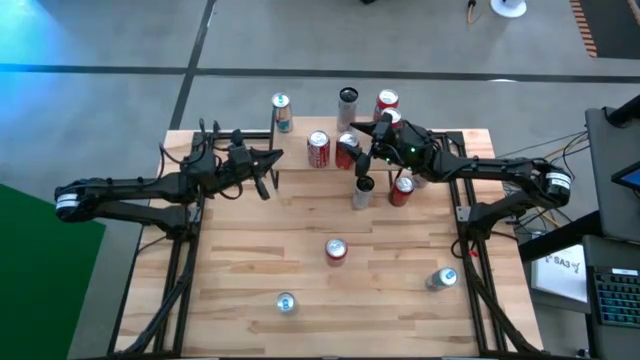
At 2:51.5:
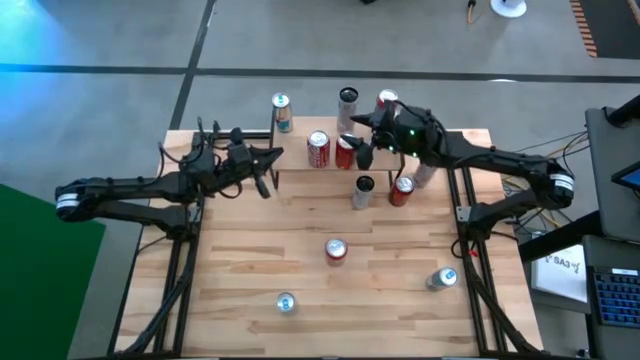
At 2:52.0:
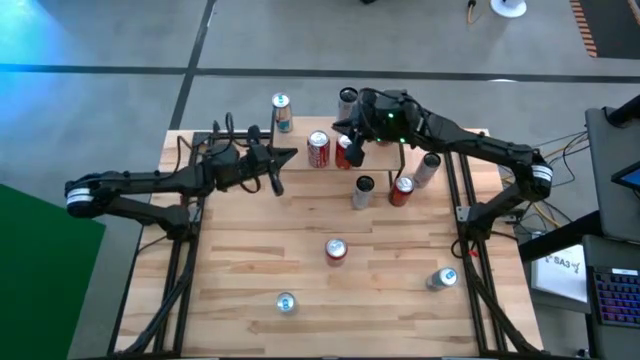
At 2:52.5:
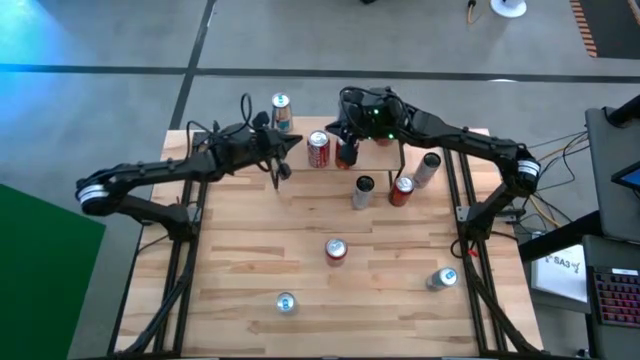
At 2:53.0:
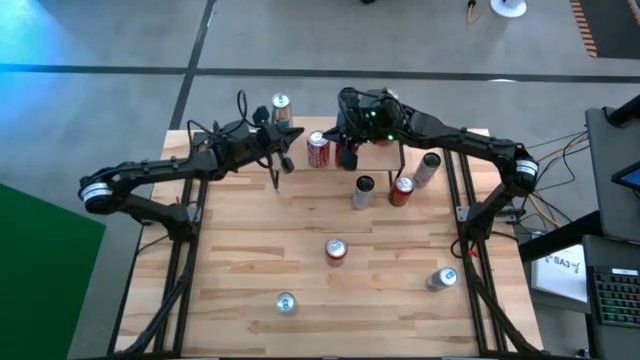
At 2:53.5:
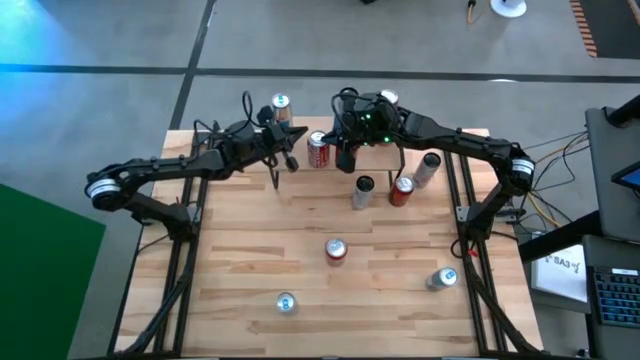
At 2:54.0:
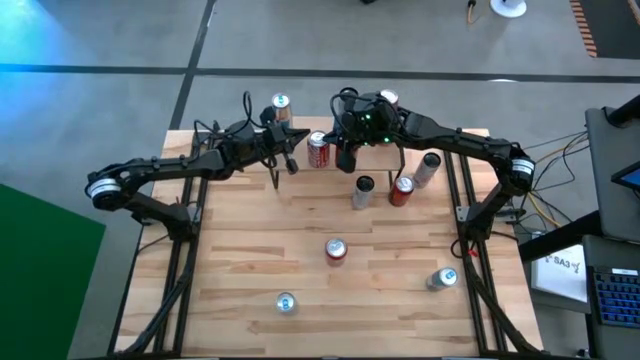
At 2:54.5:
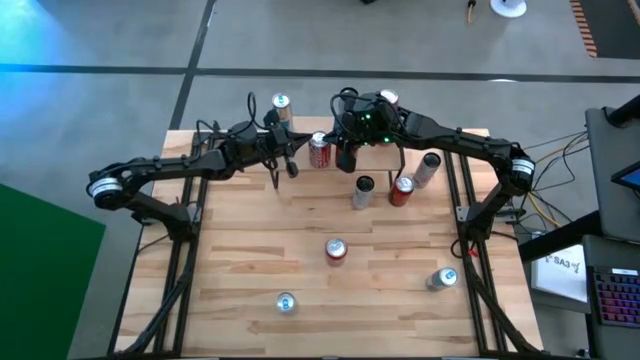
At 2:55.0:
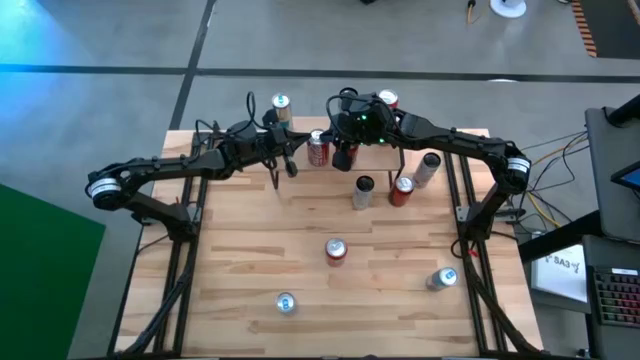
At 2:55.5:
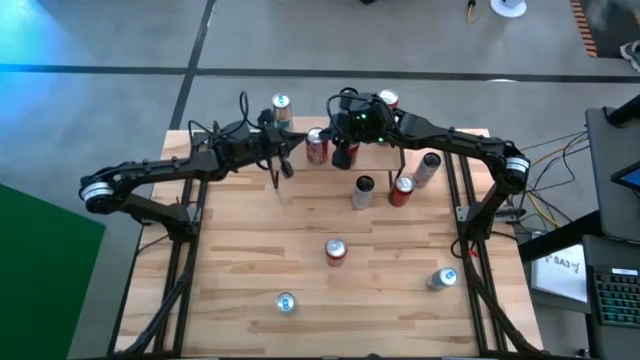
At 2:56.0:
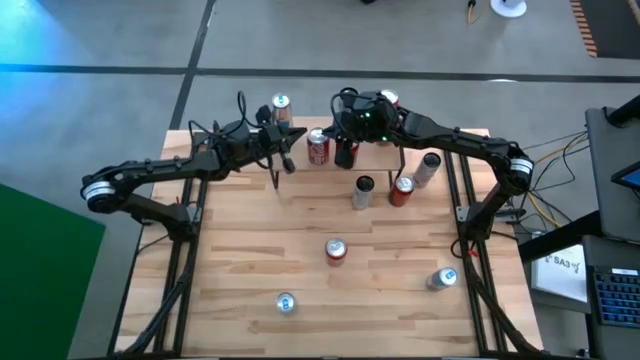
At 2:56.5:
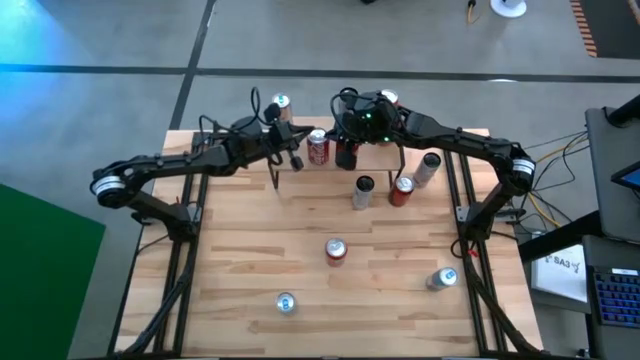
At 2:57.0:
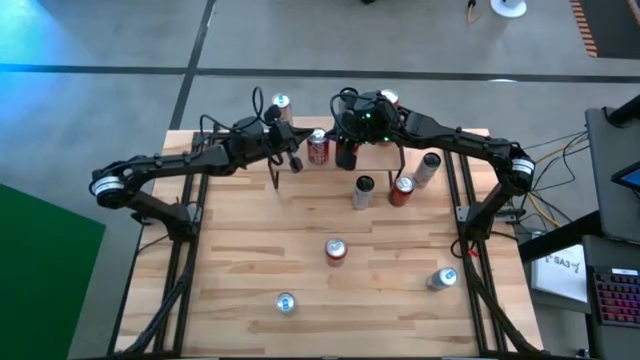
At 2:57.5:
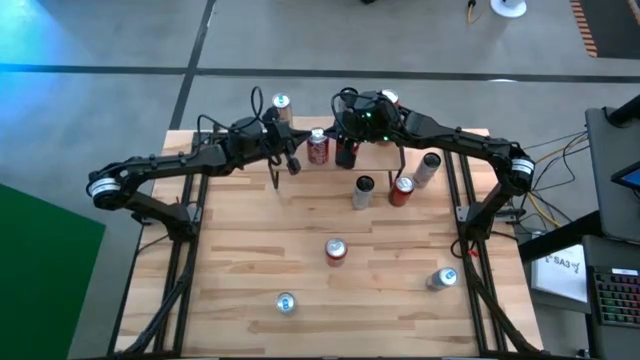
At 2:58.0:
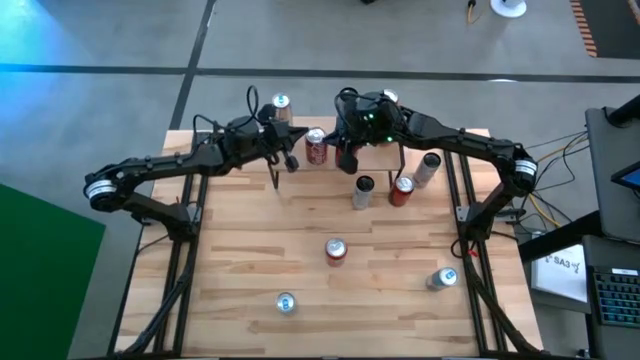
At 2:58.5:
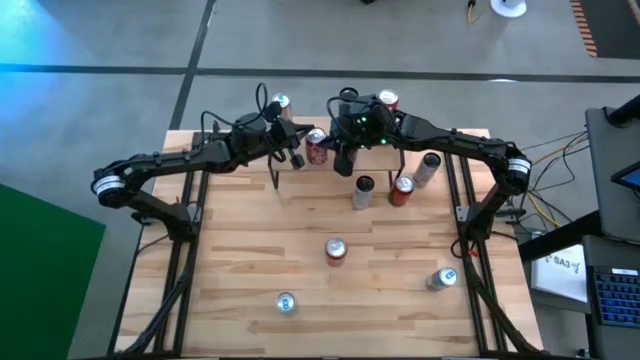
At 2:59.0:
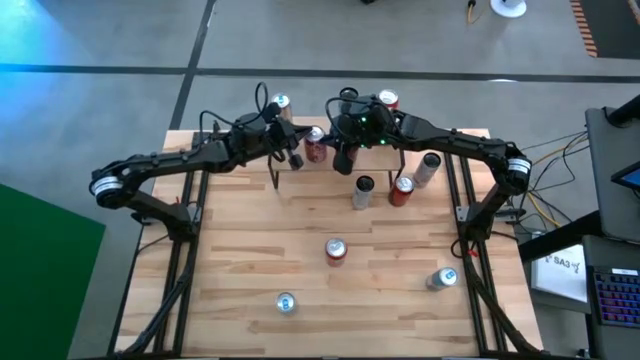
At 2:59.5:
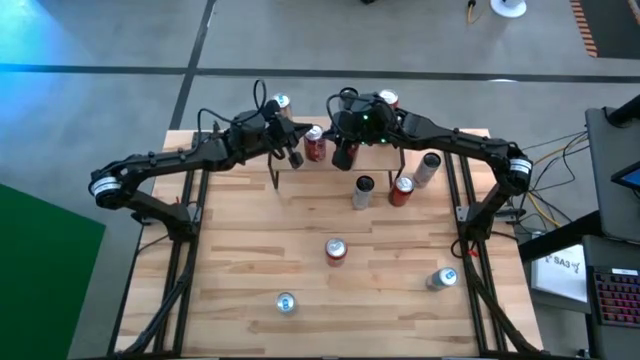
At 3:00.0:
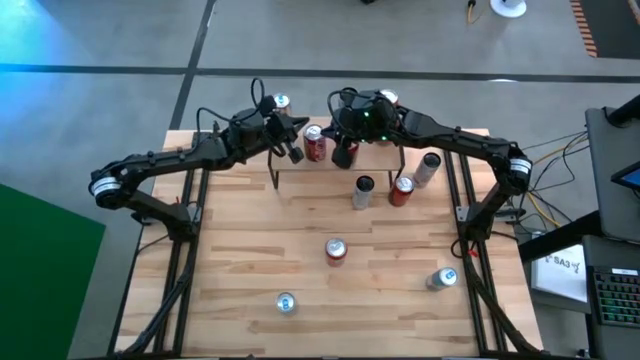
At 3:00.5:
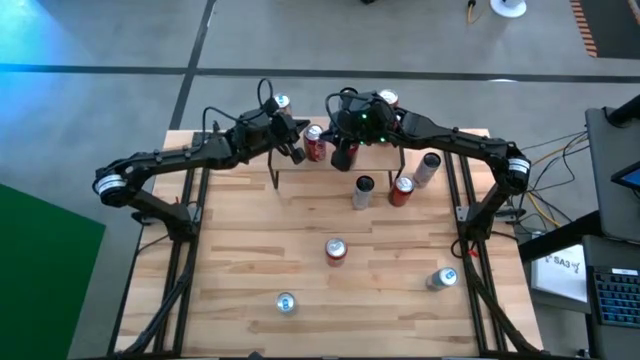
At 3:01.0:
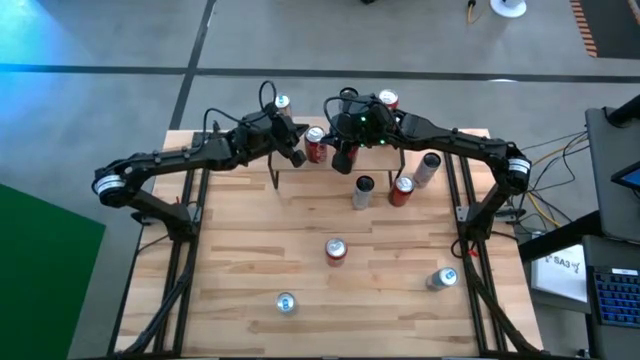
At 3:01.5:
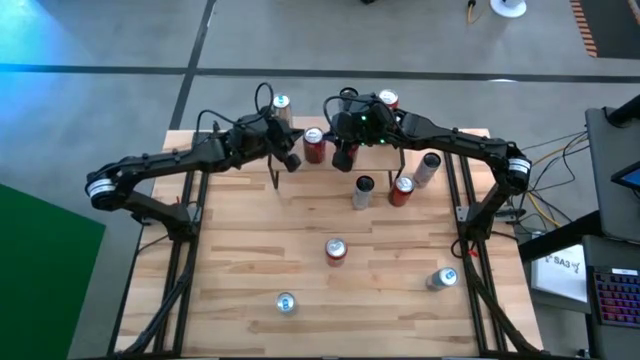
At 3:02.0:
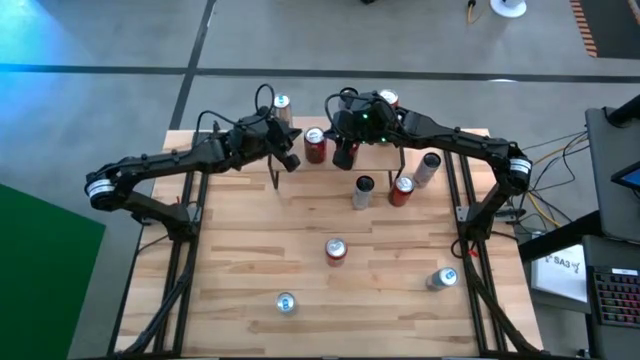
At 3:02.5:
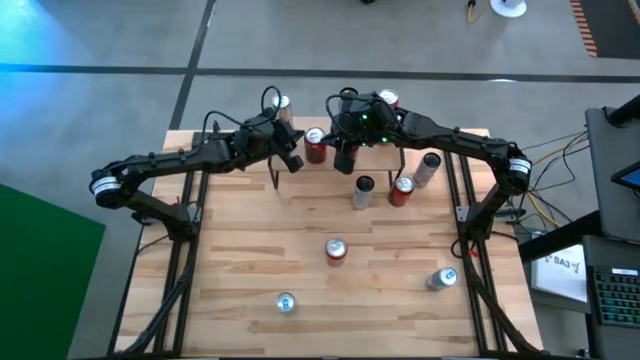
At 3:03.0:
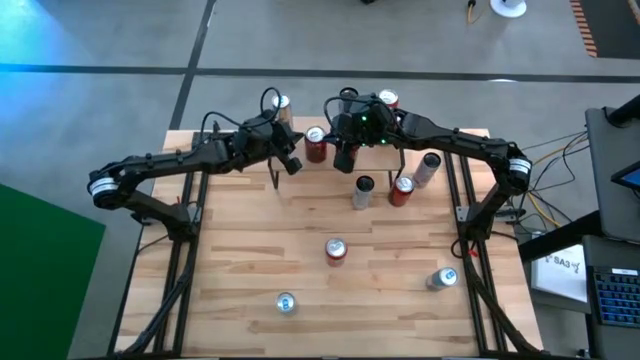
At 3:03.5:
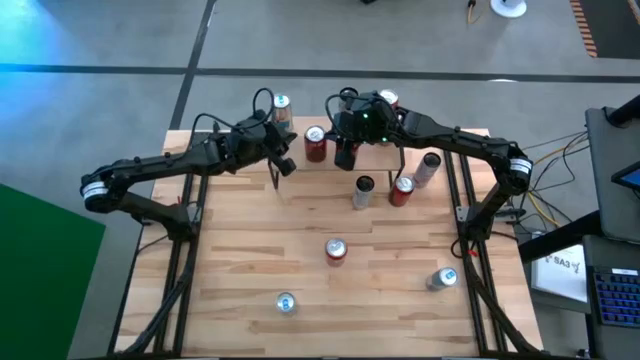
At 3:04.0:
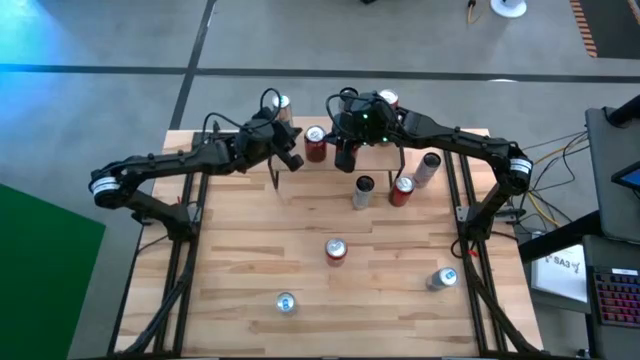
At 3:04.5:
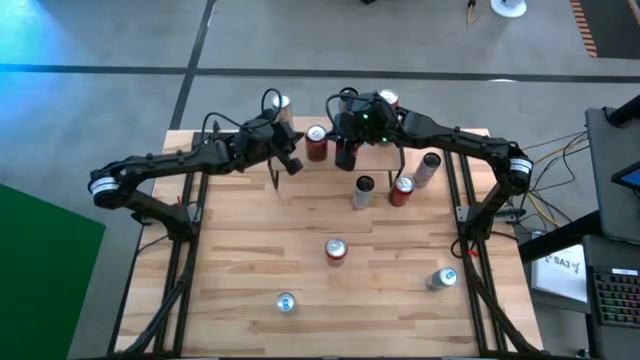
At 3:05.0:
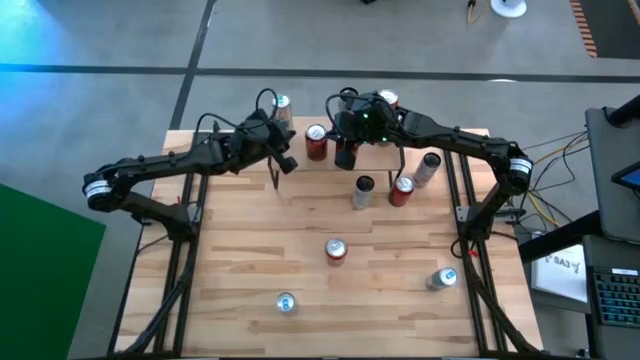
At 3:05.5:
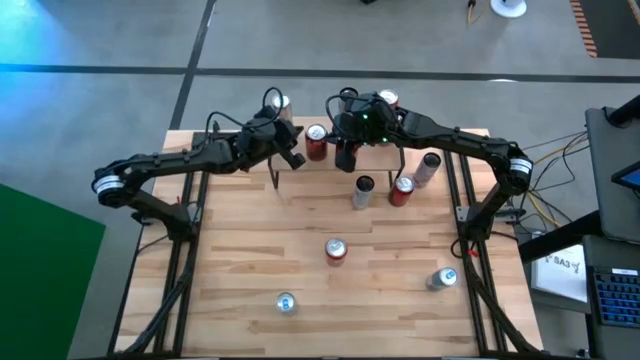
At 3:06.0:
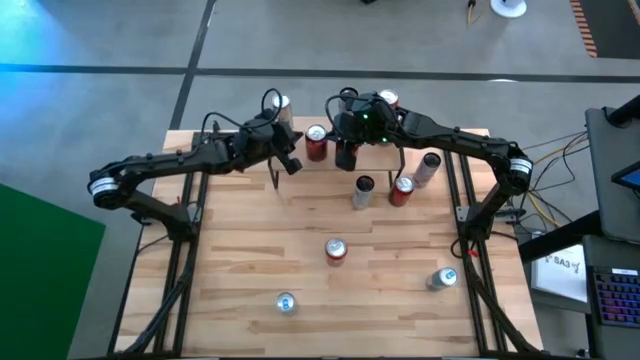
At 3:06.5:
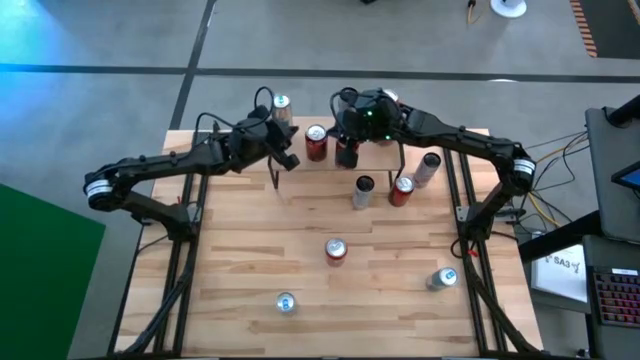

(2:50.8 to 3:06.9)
Task: Place canned beverage on shelf
Adjust the red soda can on the shelf

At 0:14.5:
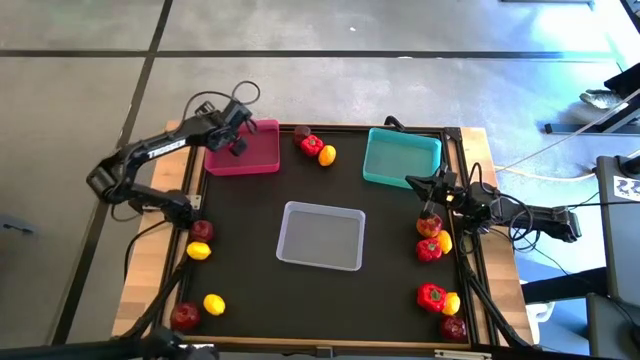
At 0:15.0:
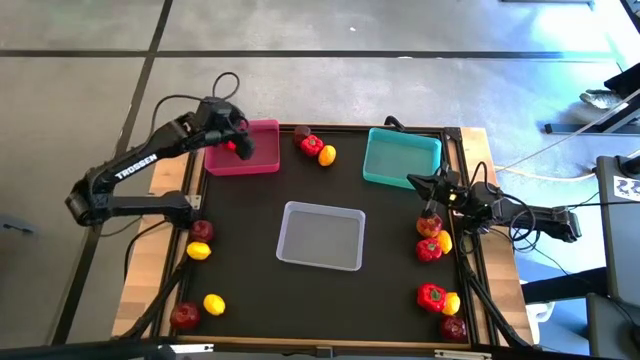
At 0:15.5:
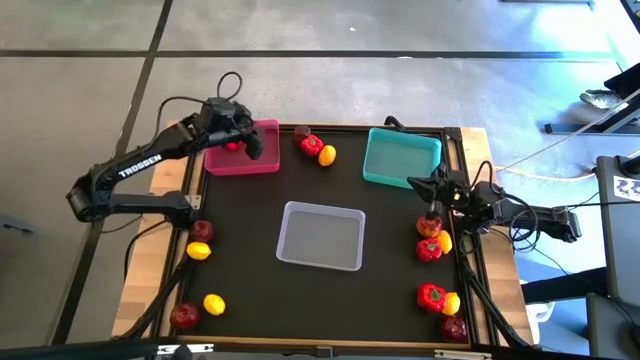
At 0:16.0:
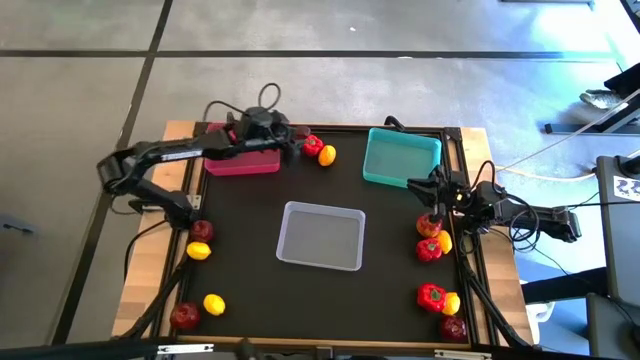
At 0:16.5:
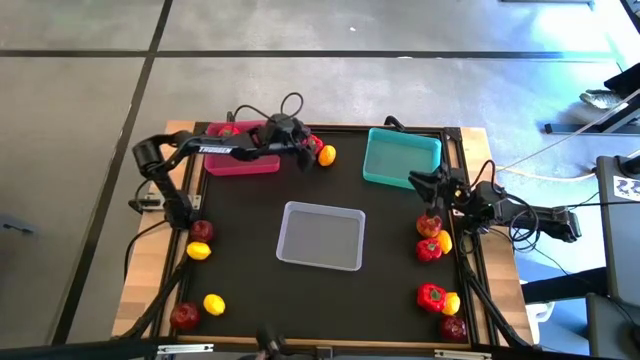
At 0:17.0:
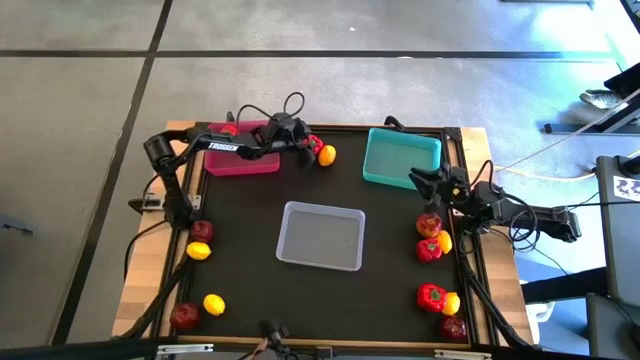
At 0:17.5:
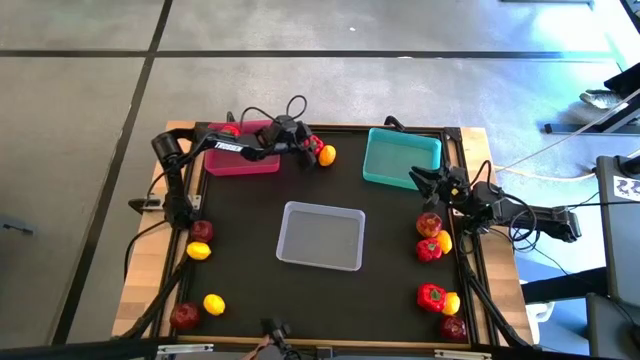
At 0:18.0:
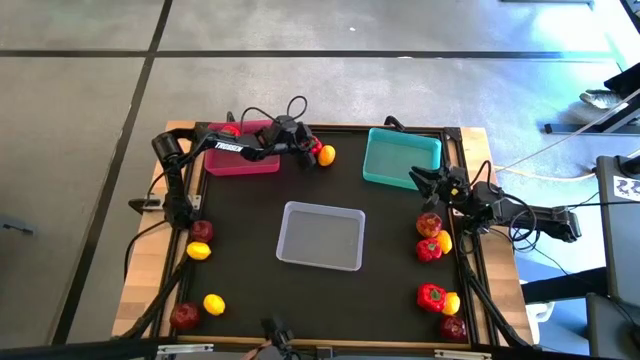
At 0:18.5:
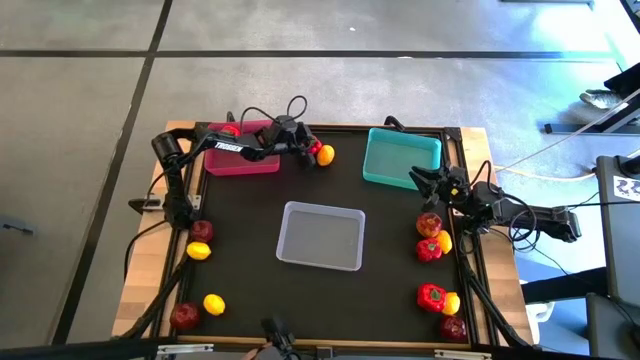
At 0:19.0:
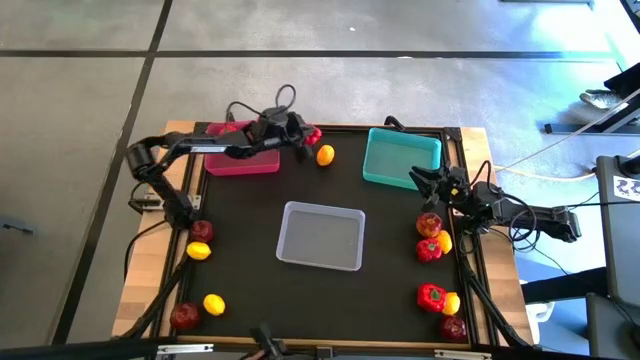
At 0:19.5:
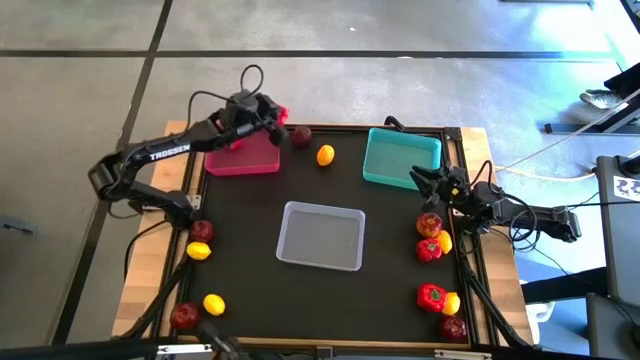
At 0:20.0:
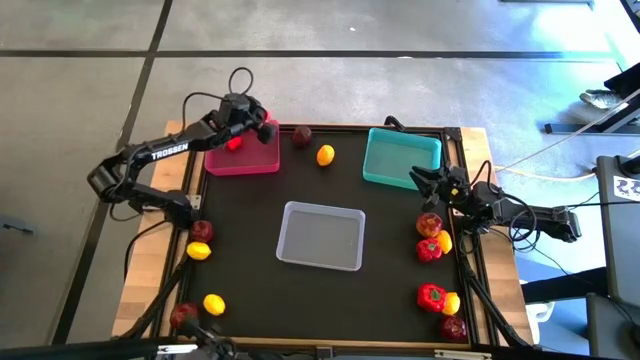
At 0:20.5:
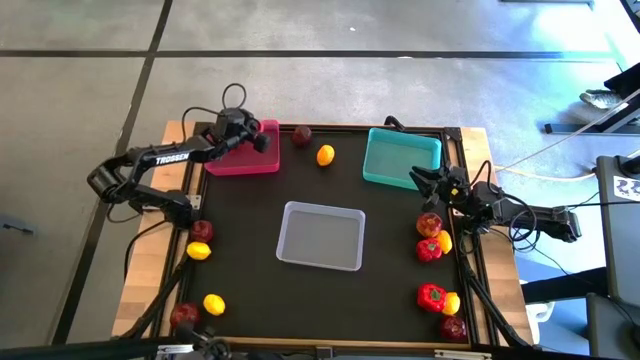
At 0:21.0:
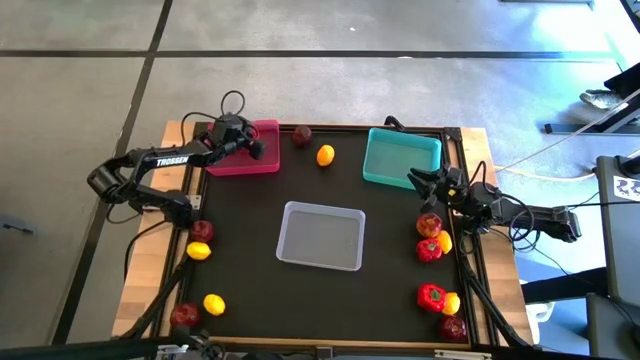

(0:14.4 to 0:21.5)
Task: Sort produce into baskets
Put the bell pepper into the pink bin
